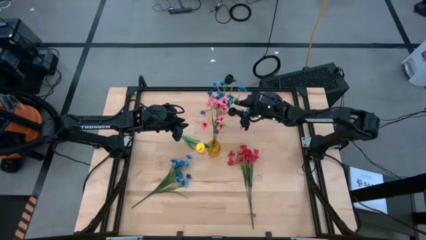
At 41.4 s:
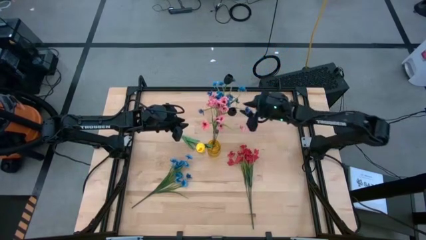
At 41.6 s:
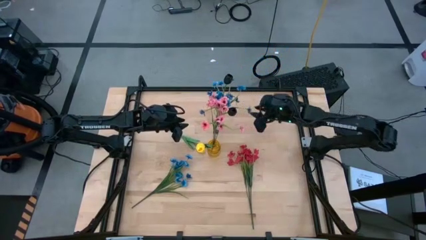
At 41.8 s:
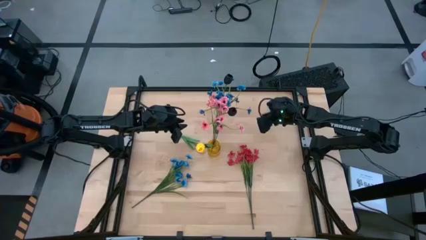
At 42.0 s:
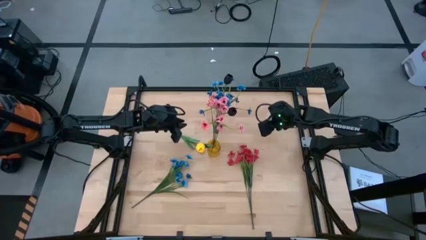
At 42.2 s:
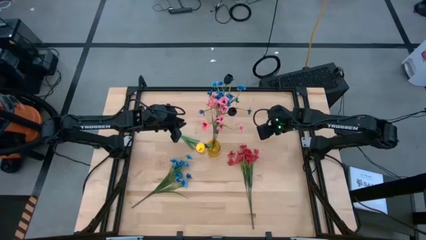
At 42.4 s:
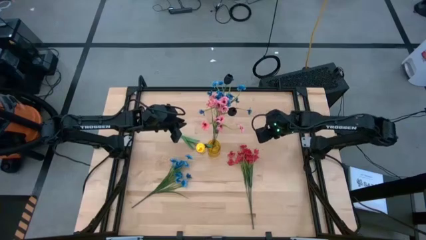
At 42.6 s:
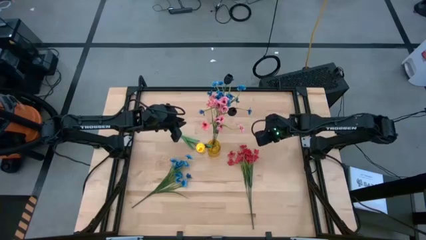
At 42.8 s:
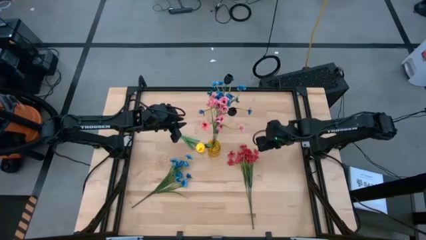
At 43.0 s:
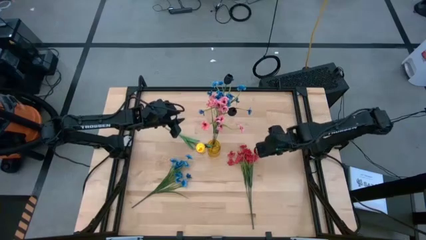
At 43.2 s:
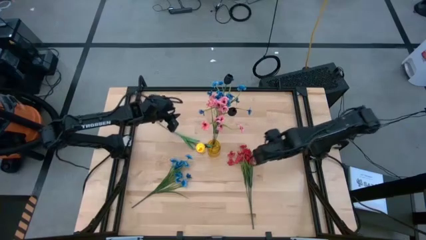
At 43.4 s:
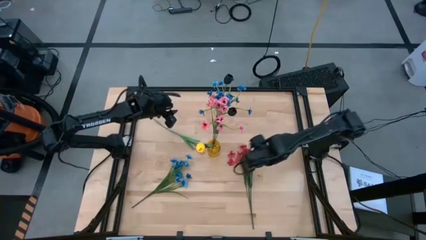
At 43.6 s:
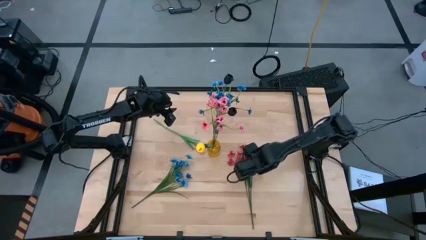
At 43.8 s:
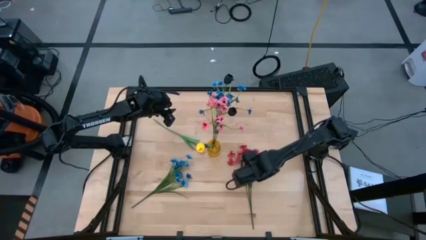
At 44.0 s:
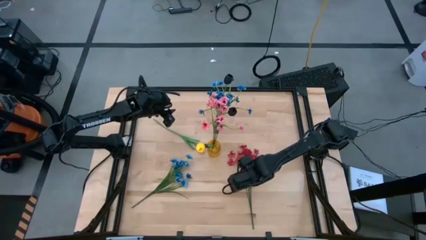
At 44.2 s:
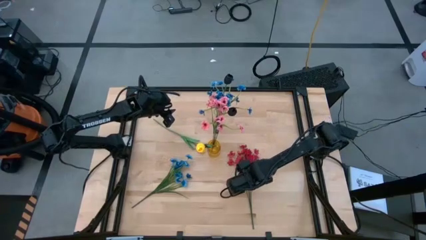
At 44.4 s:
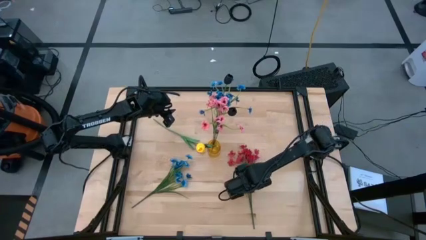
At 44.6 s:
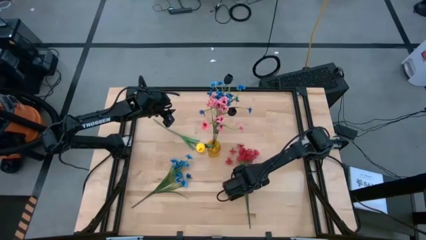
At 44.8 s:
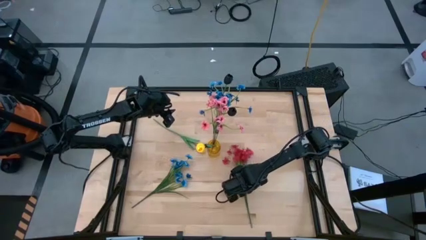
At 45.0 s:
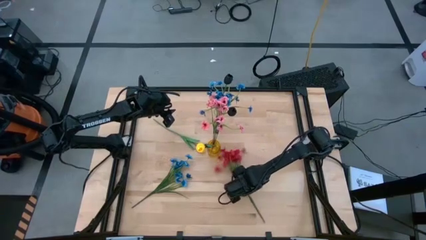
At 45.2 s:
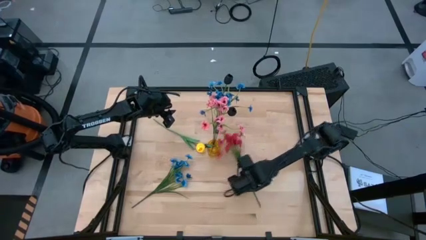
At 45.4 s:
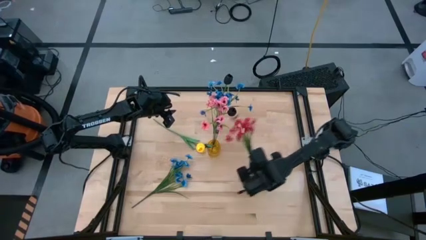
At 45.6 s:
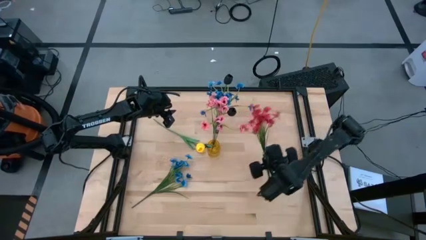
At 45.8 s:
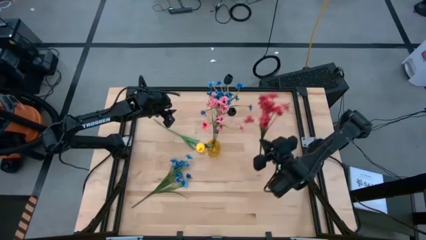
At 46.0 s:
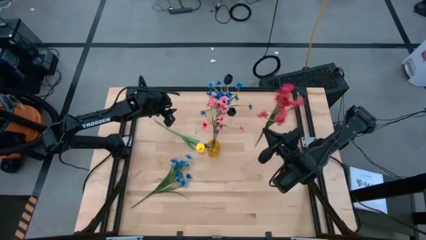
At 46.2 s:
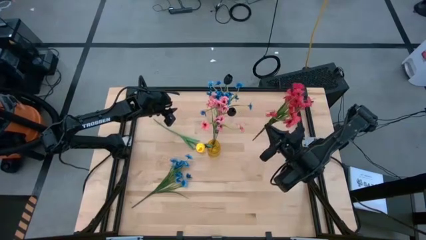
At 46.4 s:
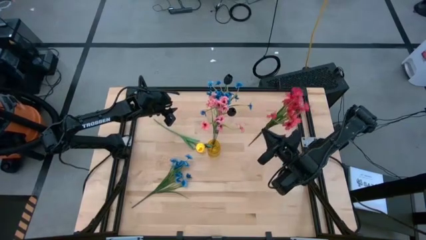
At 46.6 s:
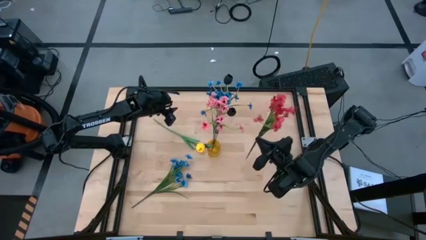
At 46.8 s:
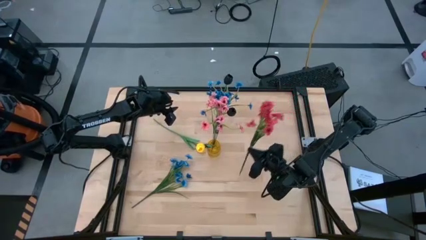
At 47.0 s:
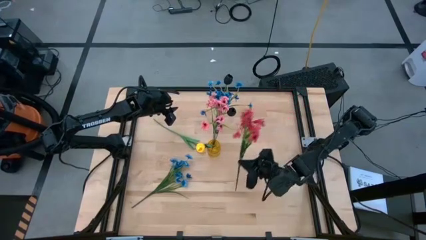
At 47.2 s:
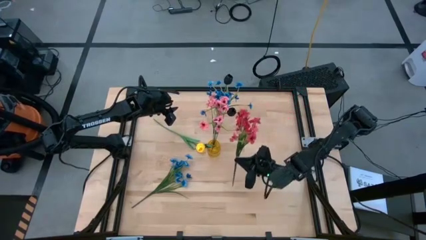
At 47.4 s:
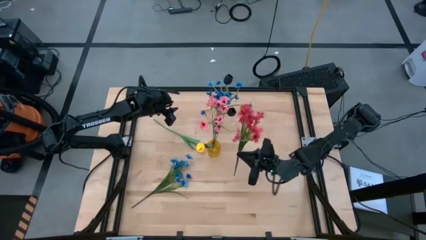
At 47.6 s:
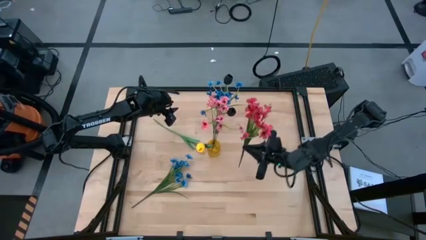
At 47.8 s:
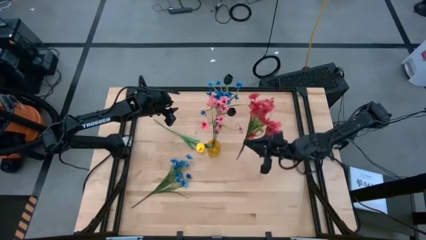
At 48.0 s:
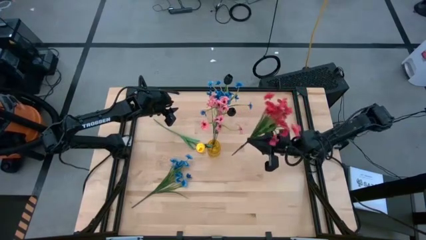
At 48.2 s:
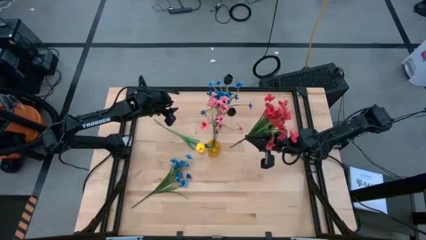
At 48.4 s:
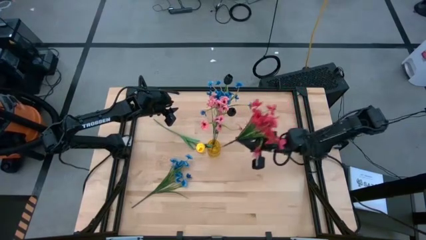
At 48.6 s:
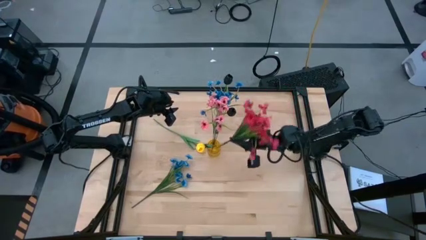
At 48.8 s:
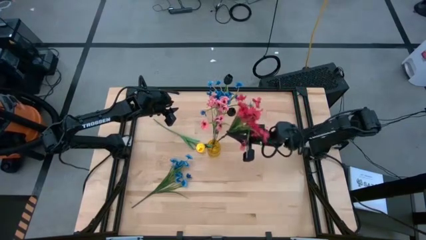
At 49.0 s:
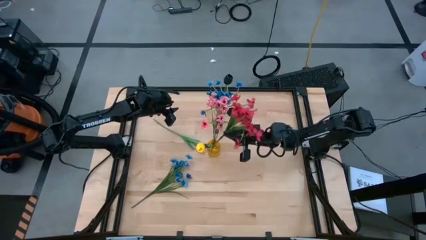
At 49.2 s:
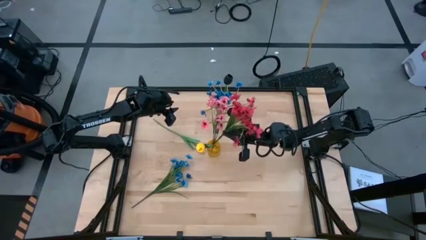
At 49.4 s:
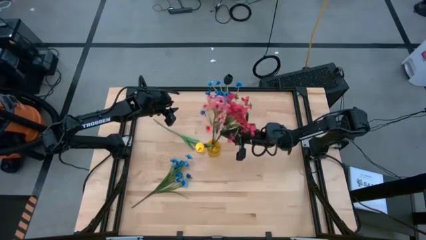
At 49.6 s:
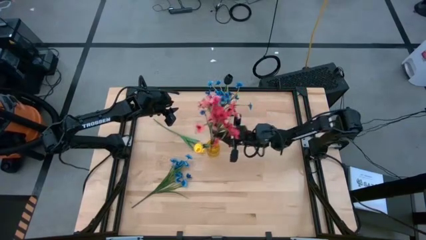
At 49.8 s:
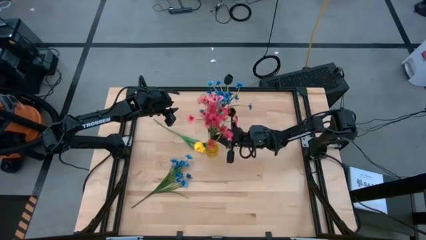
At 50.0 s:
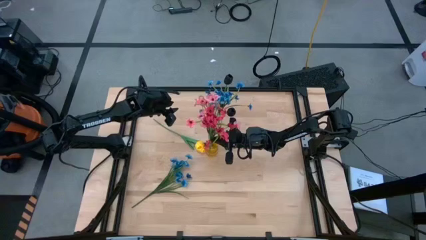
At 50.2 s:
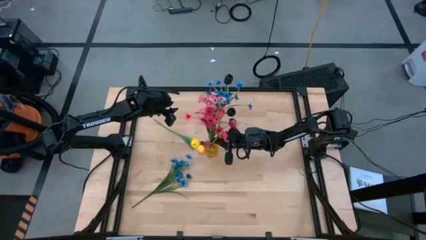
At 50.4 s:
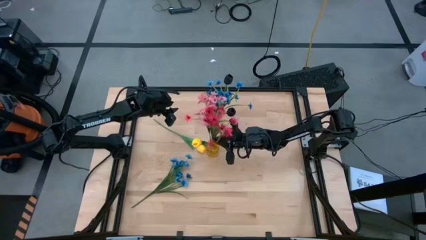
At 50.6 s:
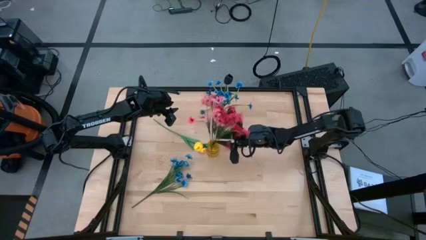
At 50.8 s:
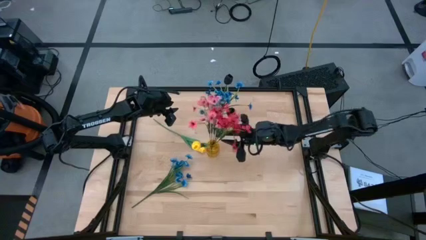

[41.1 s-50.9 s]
Task: Sort flowers into vase by color
Put the red flowers into the yellow flower vase

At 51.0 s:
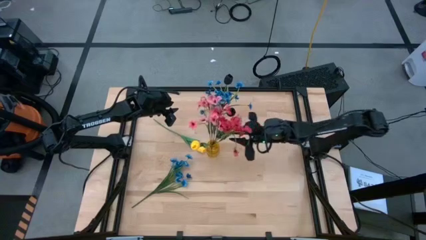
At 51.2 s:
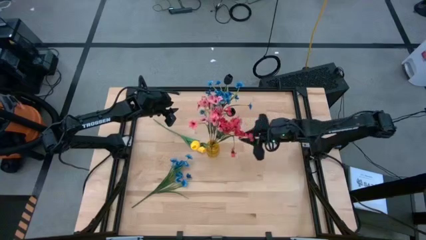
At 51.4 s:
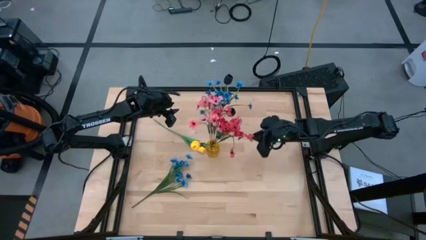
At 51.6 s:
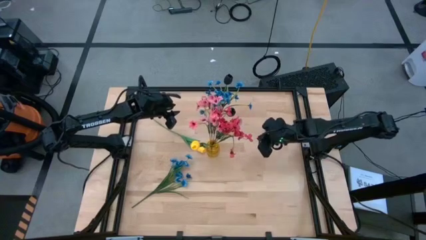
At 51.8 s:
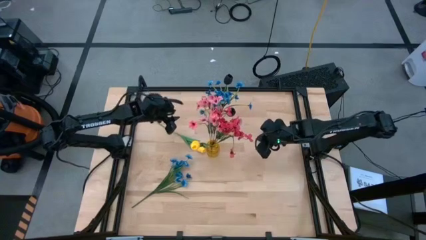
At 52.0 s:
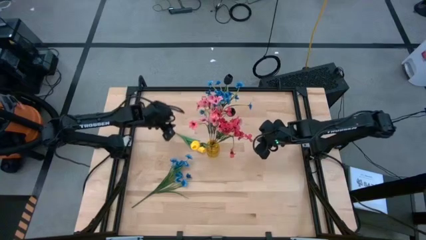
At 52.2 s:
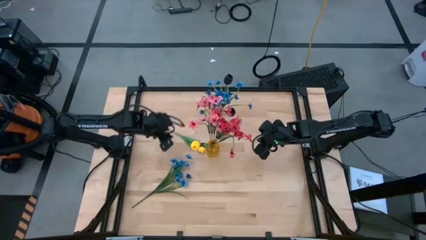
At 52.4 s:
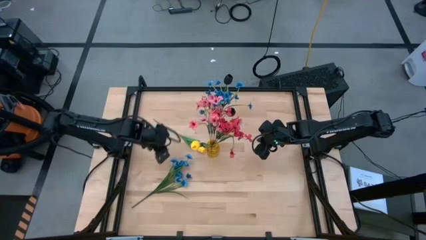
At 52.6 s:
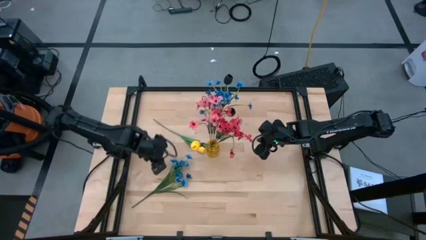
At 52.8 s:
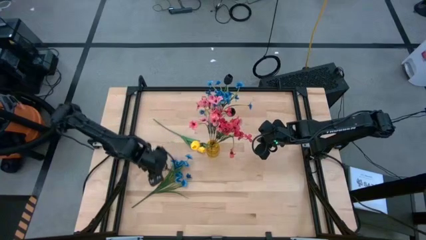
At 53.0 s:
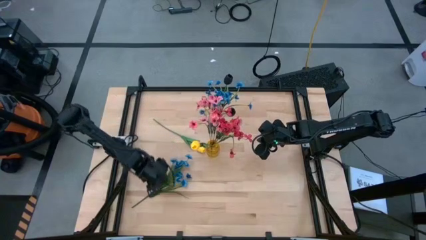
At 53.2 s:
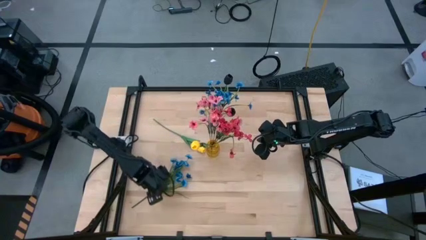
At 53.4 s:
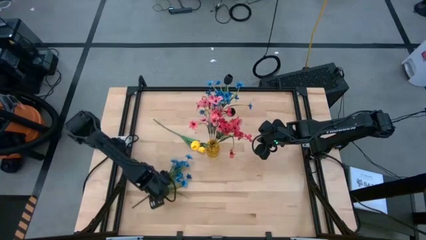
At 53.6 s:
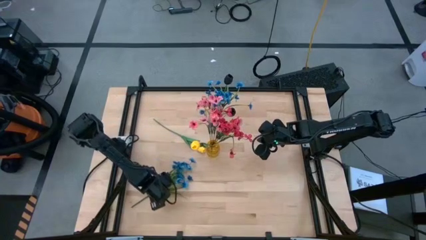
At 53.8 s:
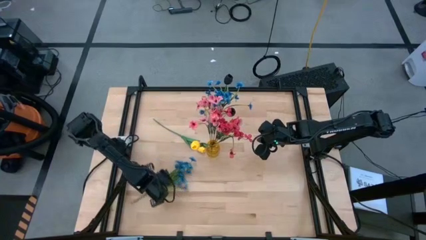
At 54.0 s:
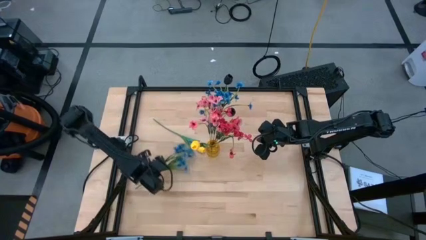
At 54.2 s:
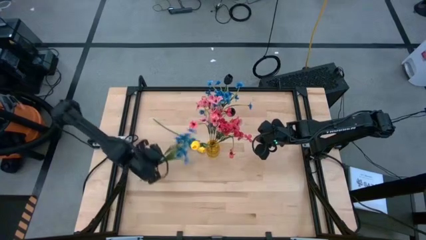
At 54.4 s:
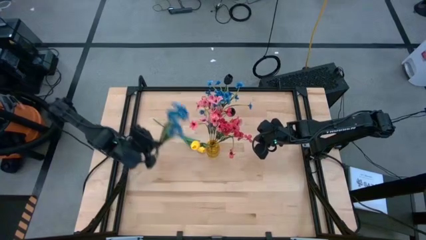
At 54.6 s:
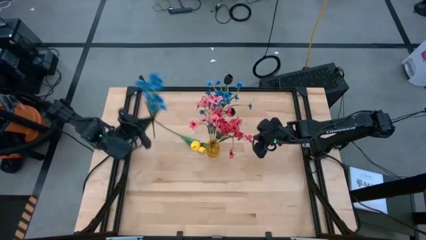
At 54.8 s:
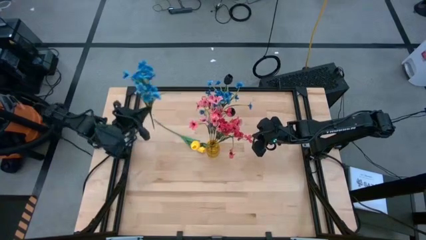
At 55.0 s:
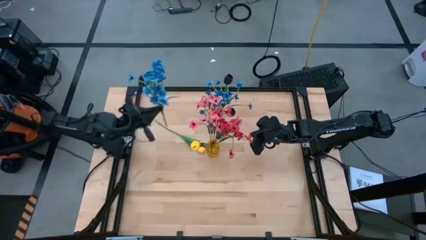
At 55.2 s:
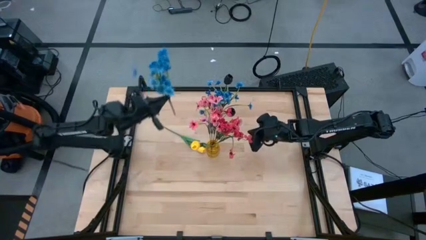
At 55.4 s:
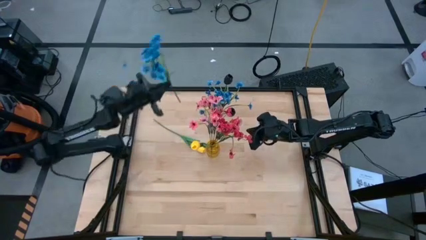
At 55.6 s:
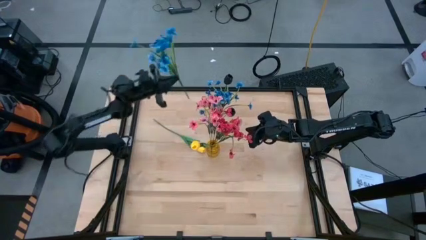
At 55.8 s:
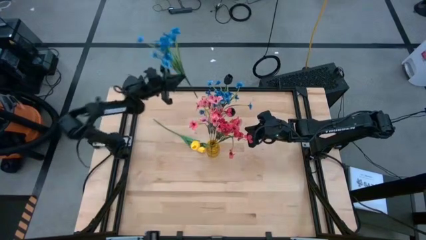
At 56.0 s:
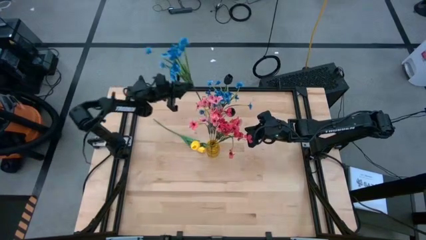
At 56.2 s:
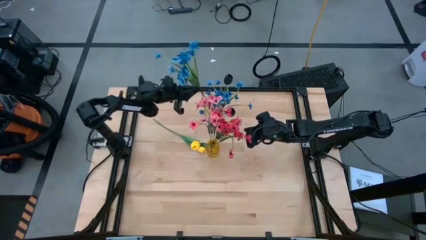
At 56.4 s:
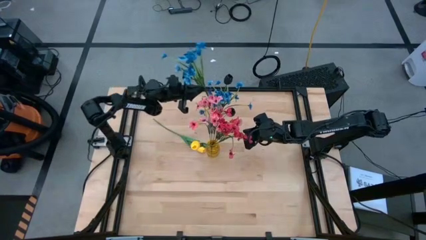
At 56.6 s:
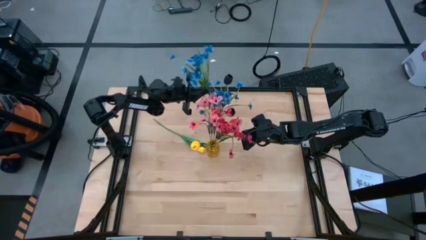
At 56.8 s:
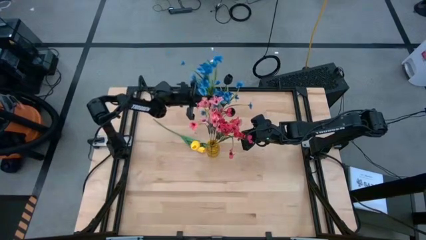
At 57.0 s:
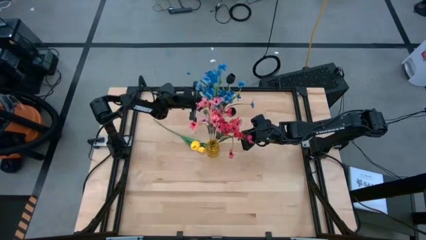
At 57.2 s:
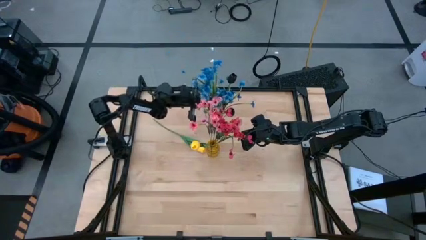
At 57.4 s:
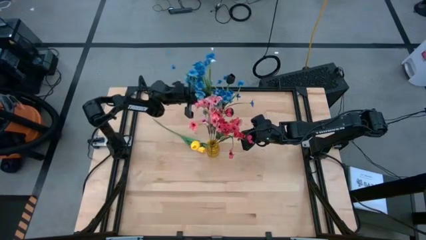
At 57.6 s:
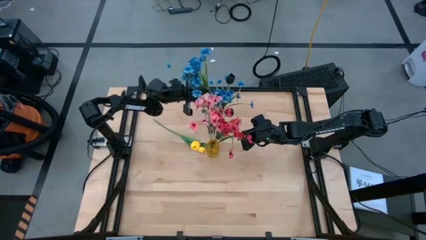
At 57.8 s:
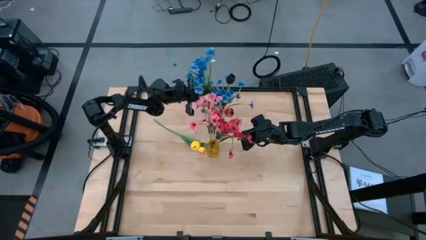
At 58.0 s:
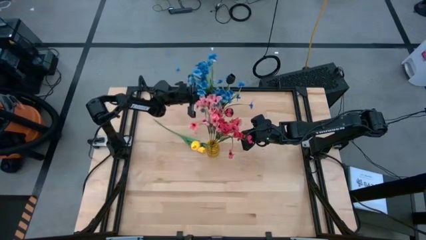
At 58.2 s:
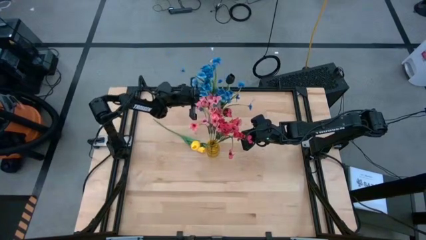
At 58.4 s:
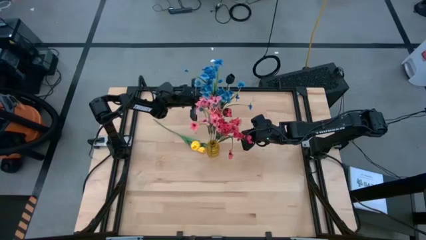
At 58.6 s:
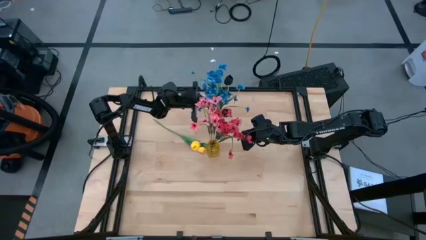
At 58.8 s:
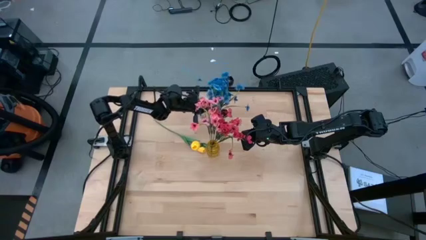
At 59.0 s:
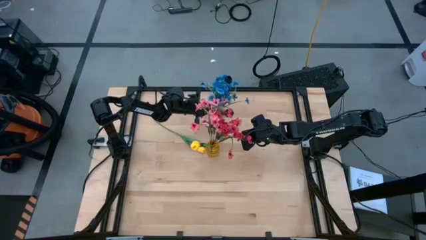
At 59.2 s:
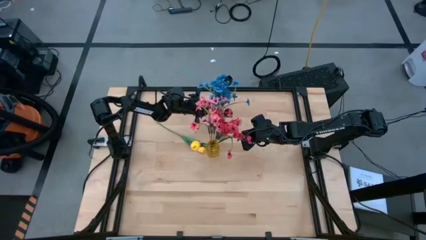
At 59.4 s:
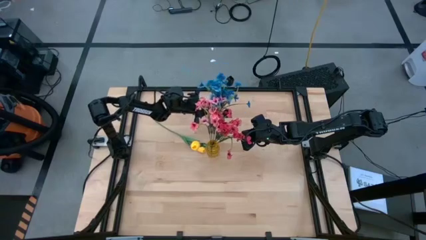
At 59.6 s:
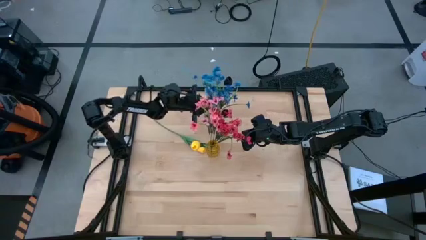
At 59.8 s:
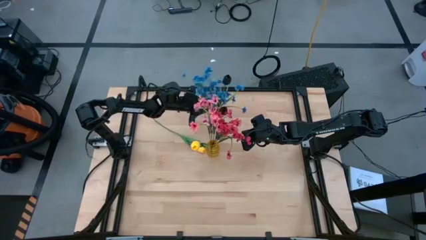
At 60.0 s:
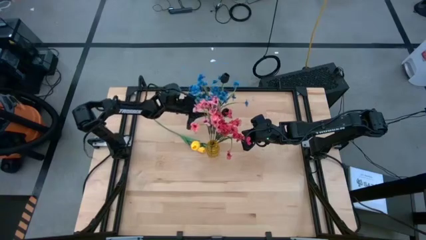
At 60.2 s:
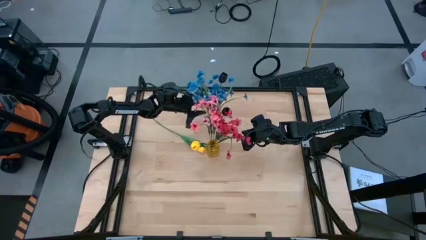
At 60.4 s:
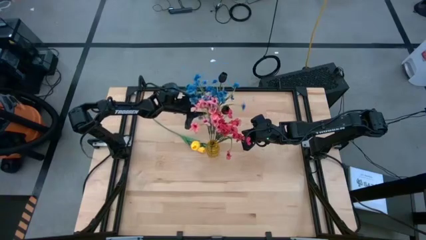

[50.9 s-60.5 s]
Put the blue flowers into the transparent flower vase
